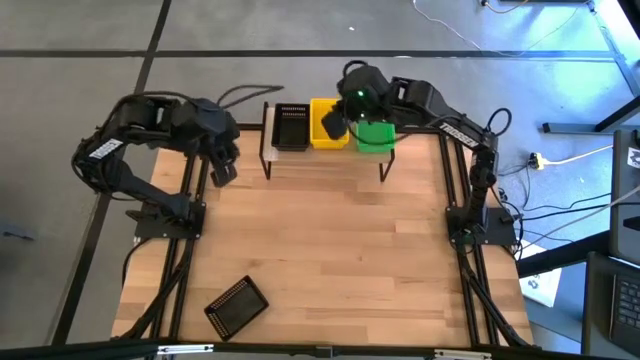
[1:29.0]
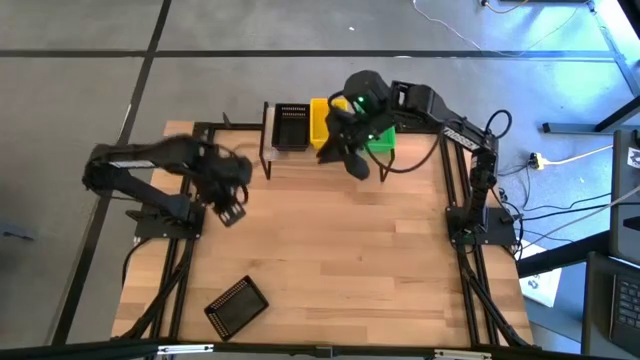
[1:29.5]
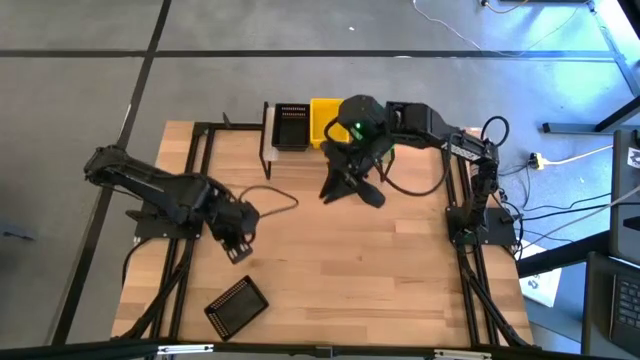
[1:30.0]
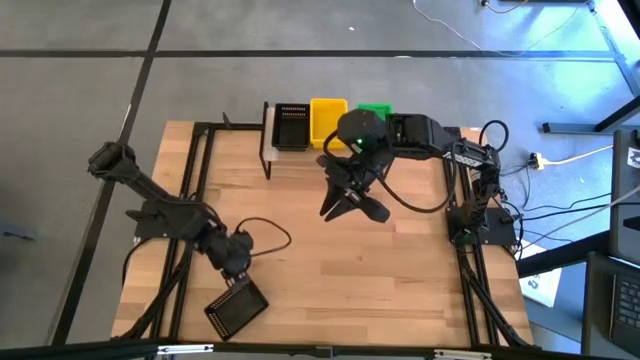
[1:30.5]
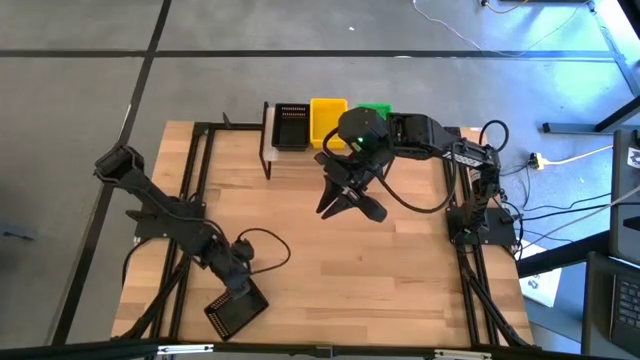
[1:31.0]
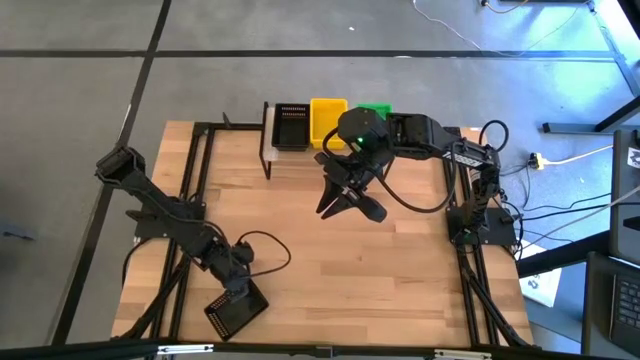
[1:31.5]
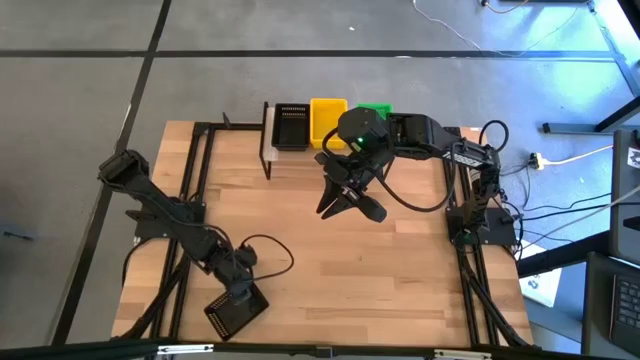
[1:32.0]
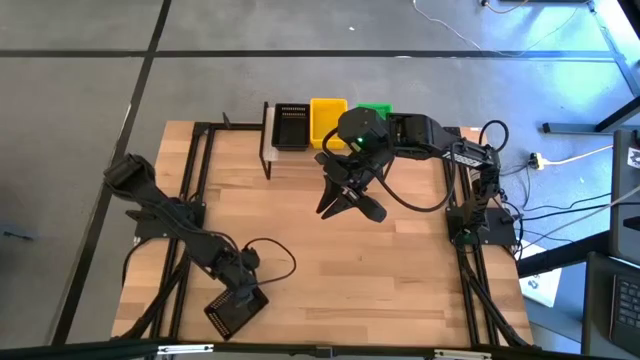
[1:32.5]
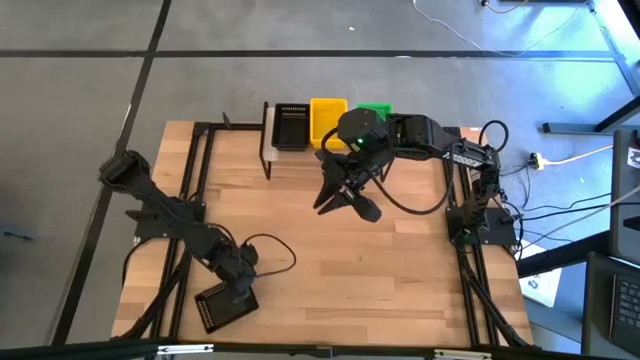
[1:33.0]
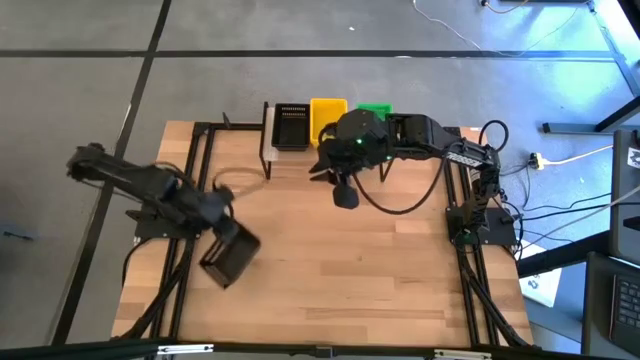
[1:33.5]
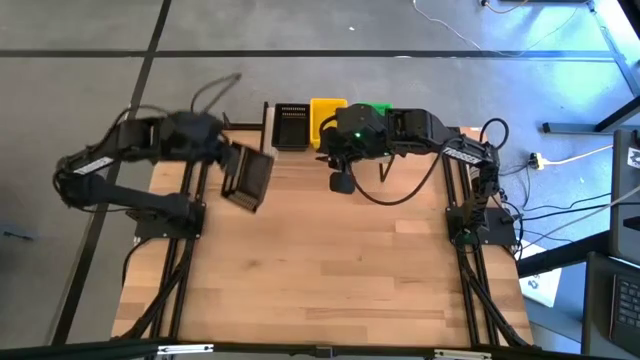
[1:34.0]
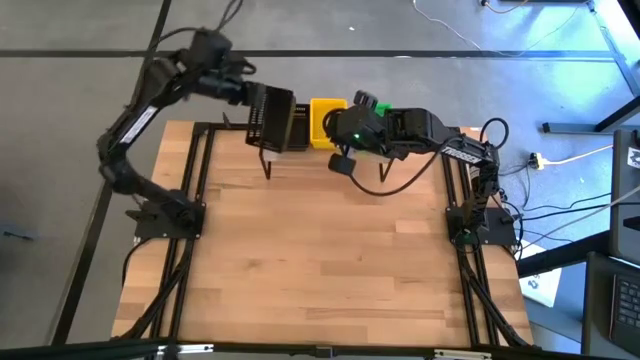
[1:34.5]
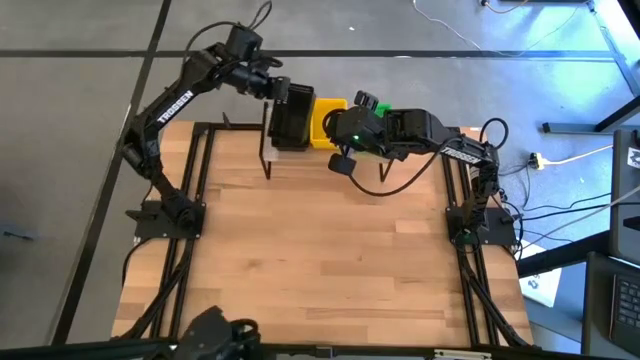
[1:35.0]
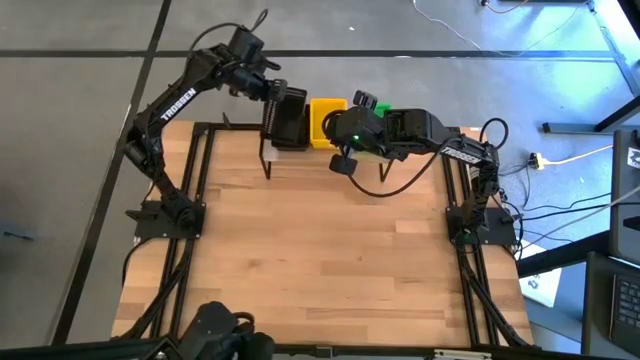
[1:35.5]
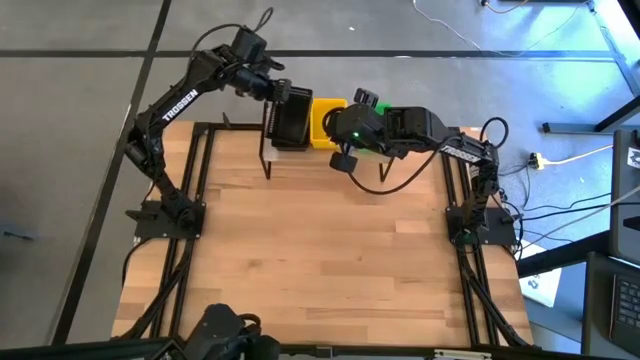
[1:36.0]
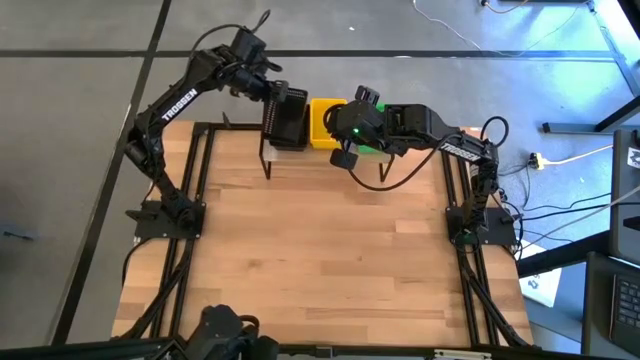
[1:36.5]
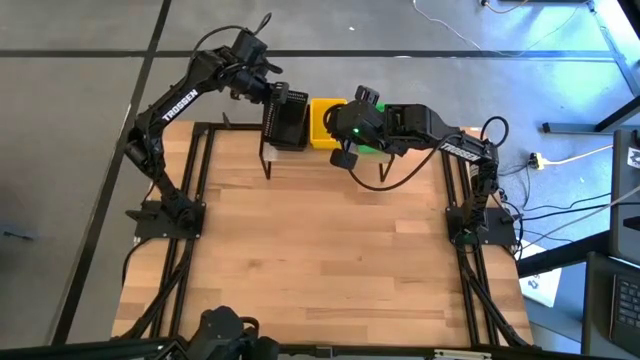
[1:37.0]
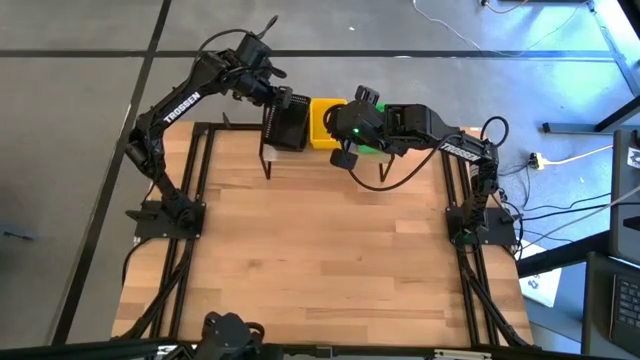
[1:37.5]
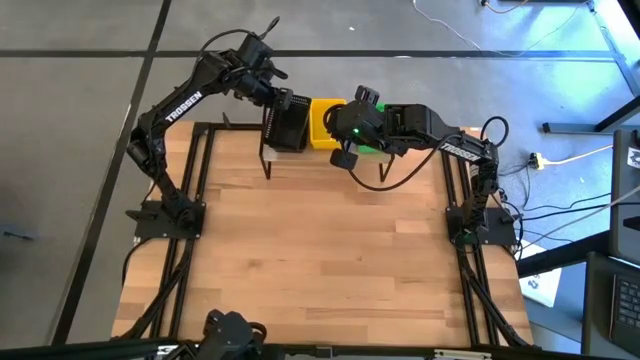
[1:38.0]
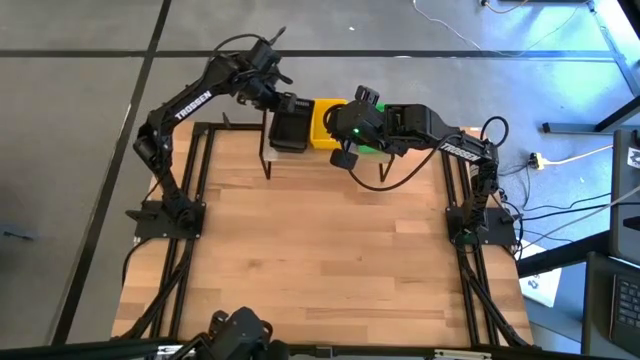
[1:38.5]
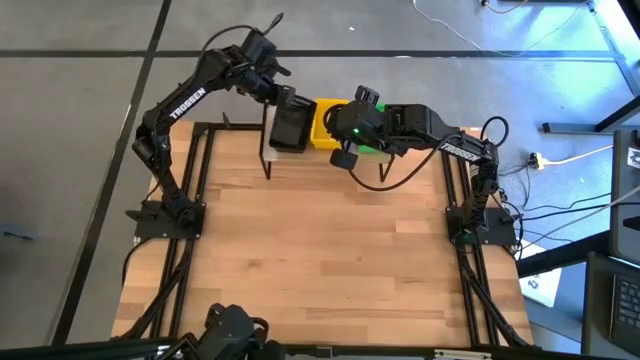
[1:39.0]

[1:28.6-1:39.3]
Task: Stack baskets on shelf by color
Stack the black bin on top of the other black bins on the shelf

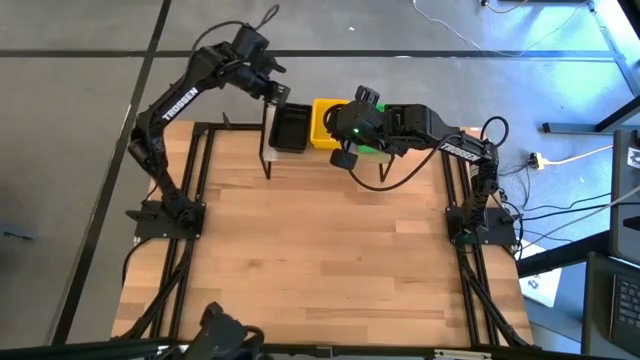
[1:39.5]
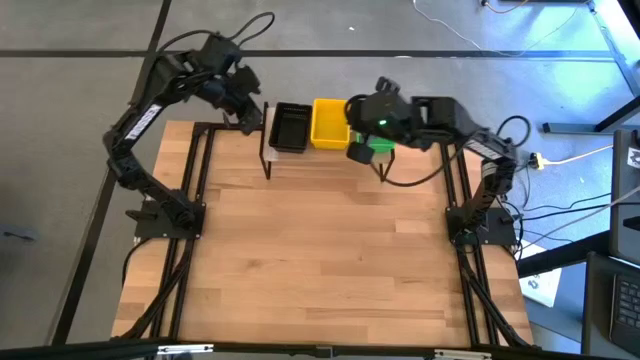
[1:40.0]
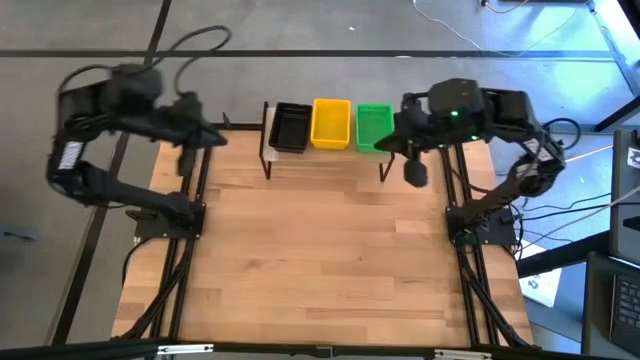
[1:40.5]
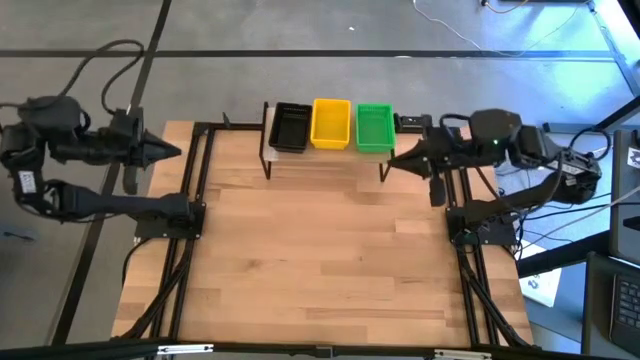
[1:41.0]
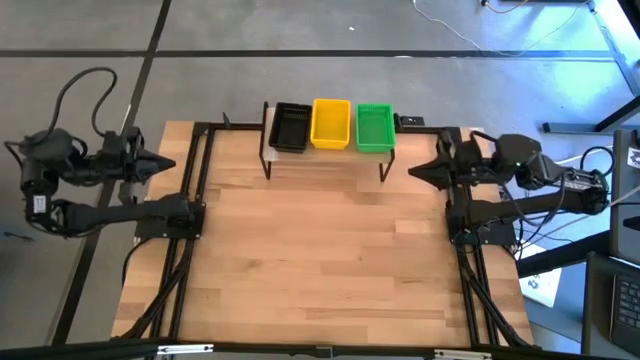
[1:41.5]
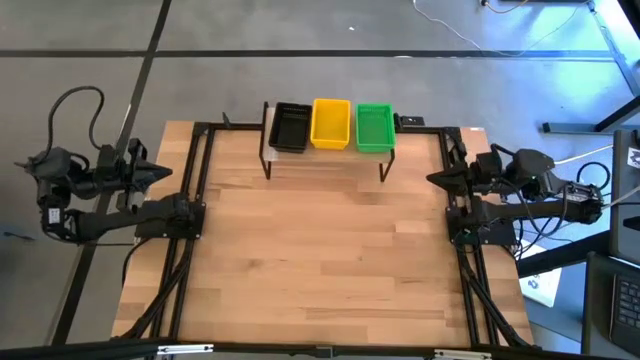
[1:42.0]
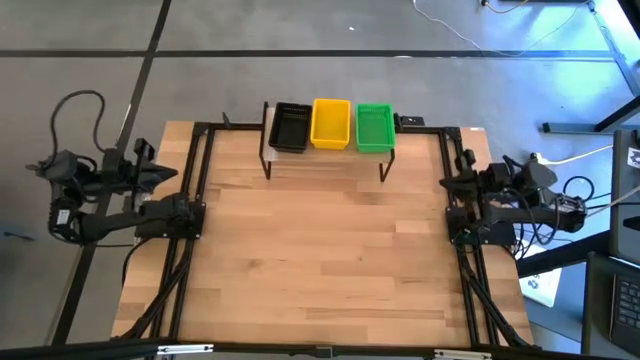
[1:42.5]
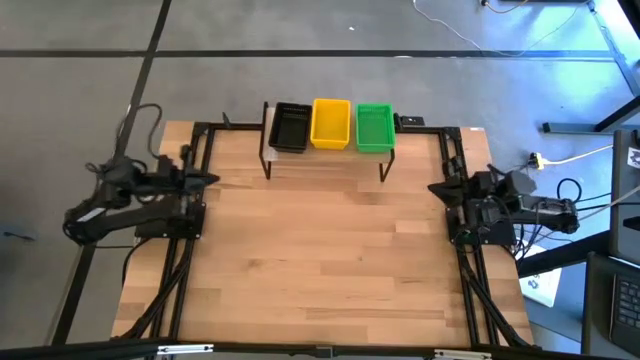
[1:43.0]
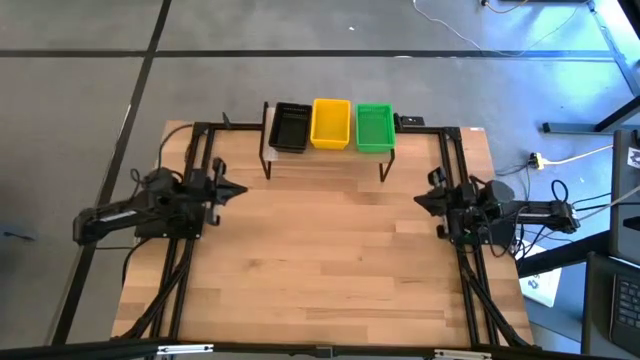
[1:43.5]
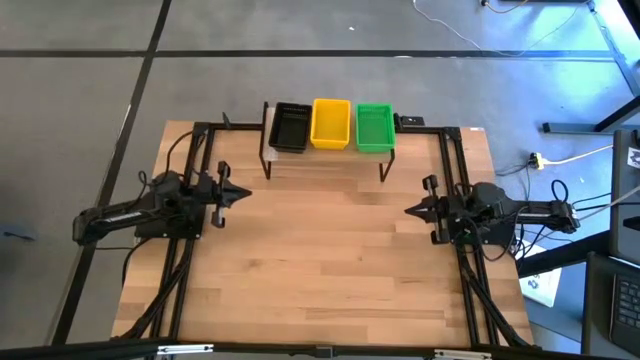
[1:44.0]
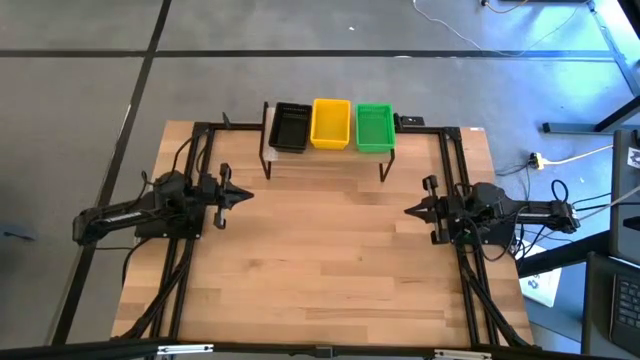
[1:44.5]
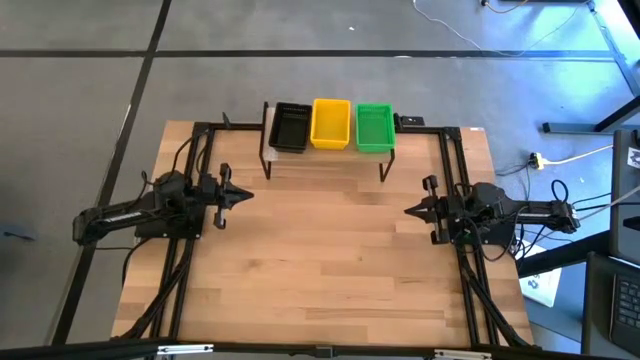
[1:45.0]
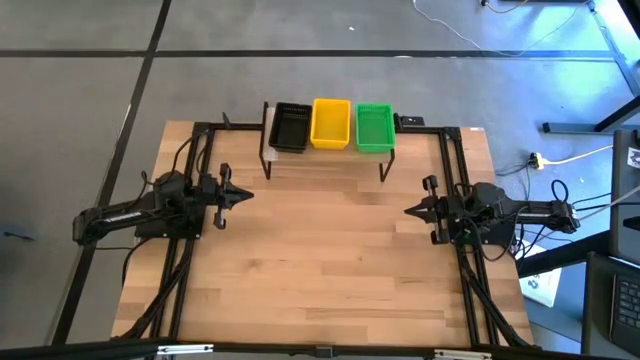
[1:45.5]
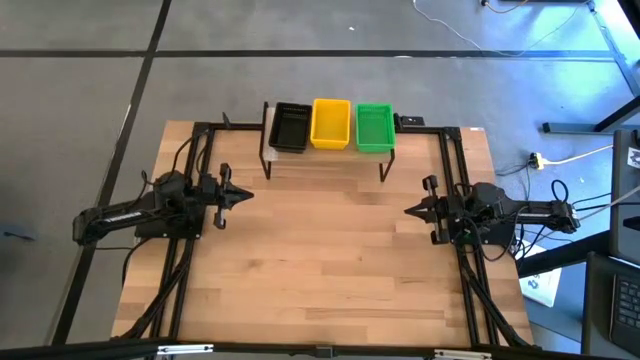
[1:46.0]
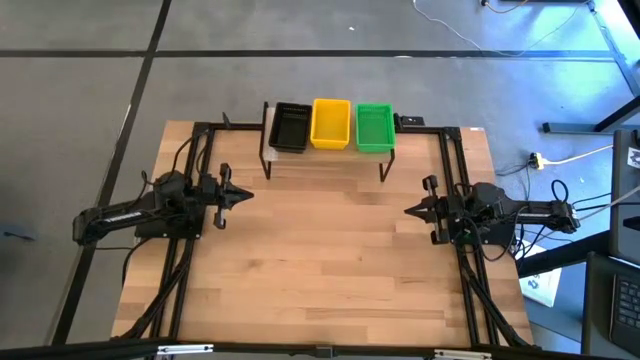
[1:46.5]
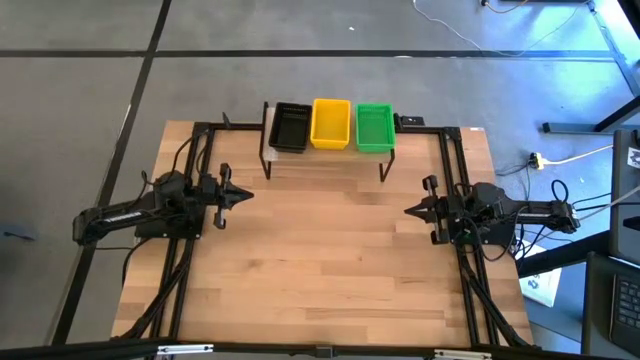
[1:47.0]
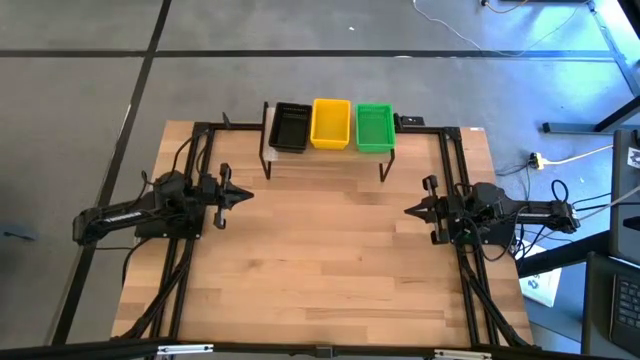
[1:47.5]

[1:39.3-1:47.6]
Return to Home Position

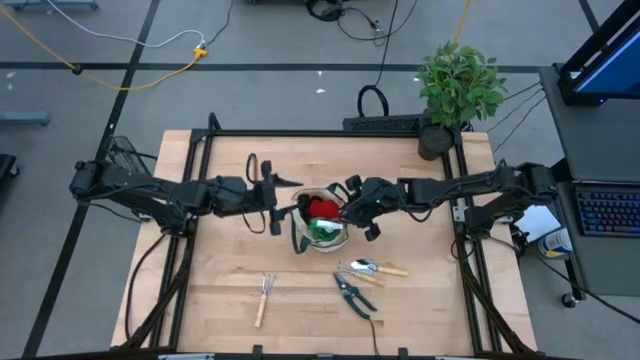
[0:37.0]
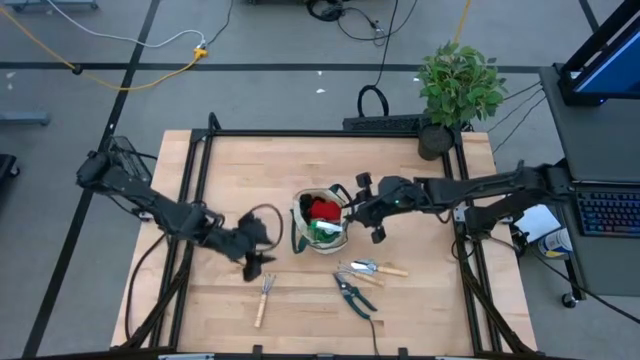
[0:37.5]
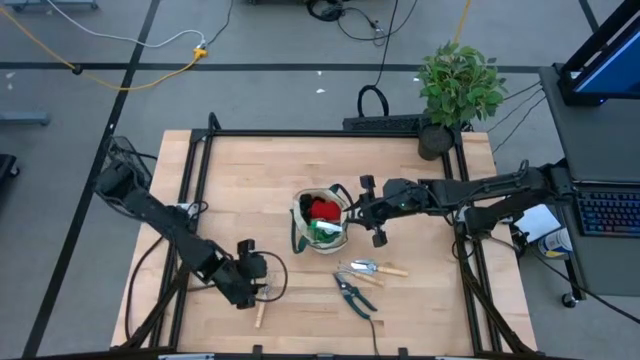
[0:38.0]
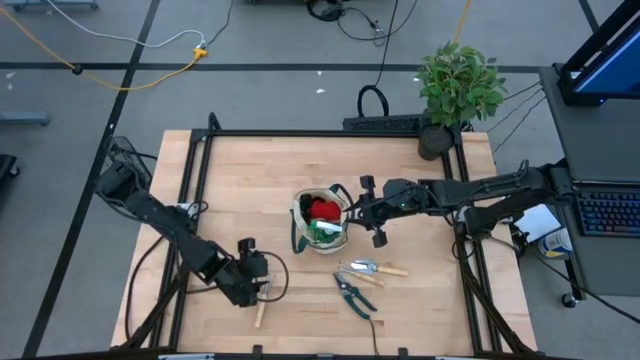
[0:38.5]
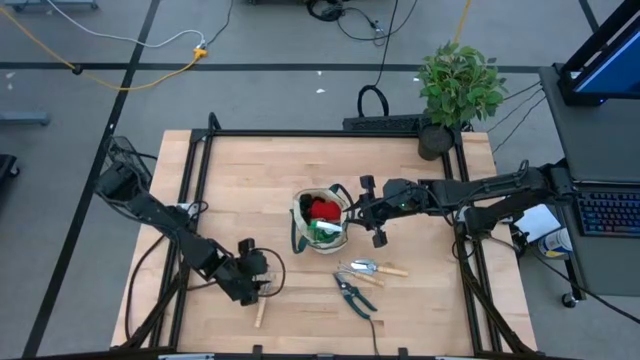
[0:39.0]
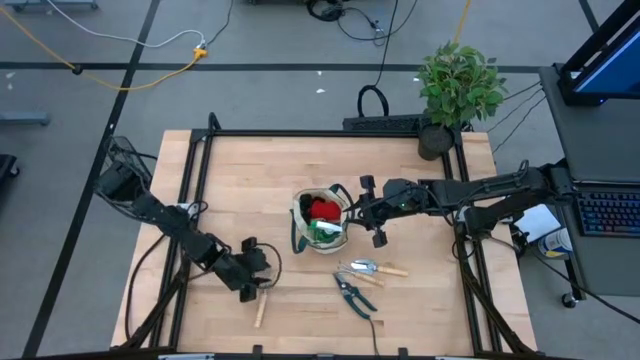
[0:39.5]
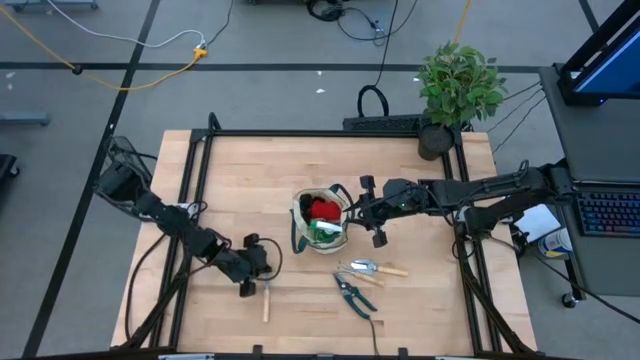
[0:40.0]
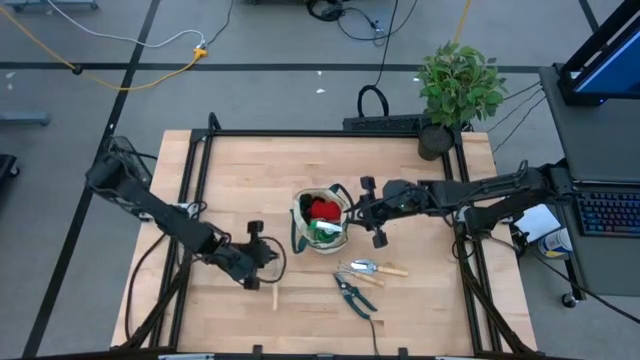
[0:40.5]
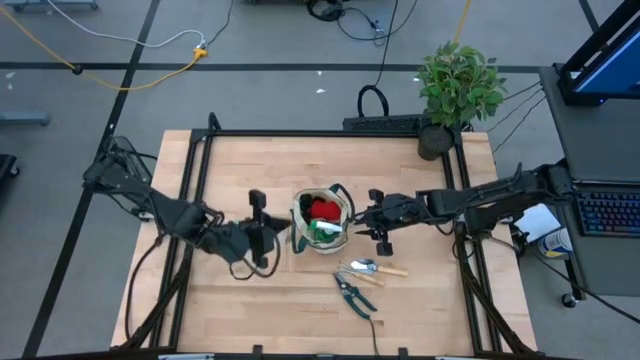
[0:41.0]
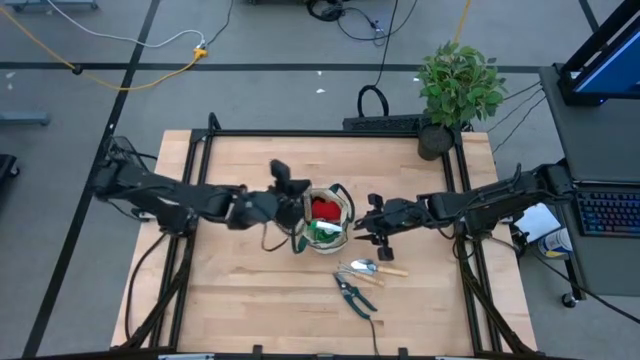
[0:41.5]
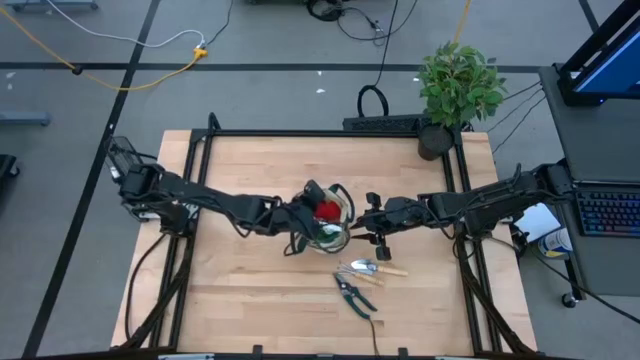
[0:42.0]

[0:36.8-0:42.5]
Task: Pick & Place Garden tools in Gardening bag
Put the left brown hand rake into the white gardening bag
